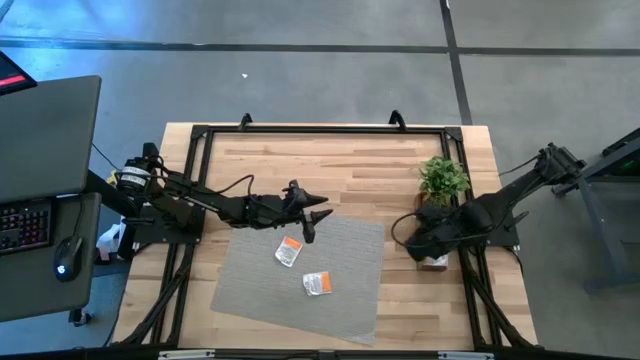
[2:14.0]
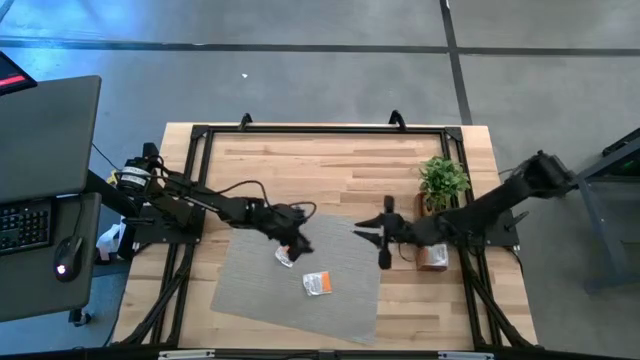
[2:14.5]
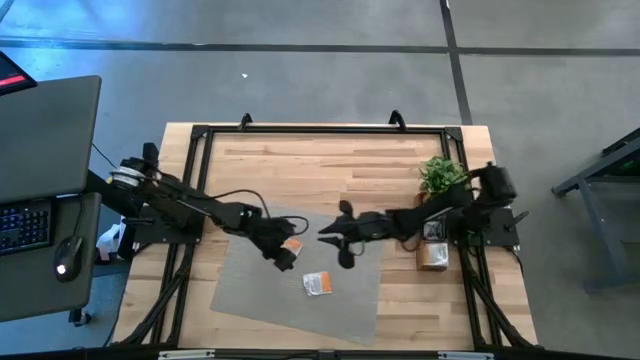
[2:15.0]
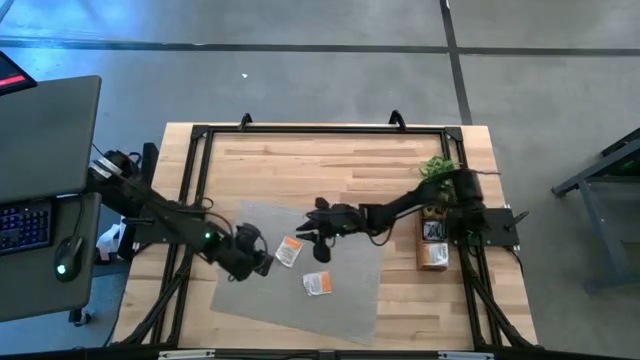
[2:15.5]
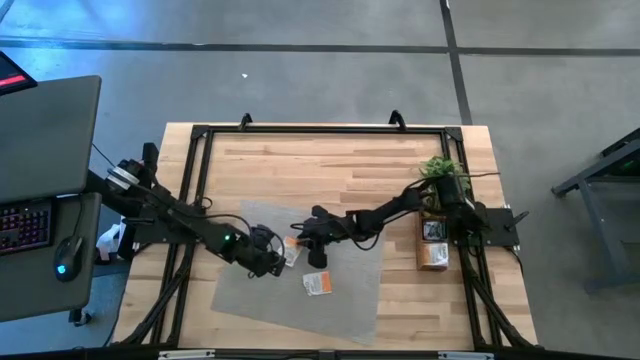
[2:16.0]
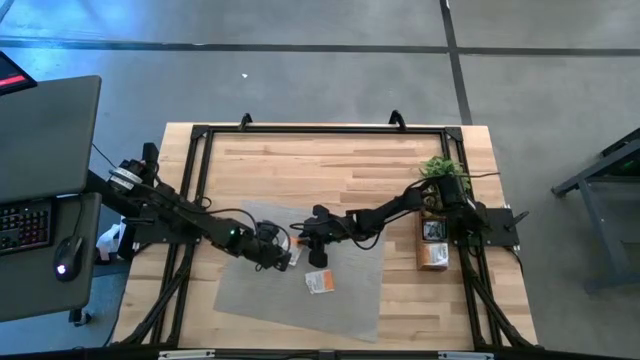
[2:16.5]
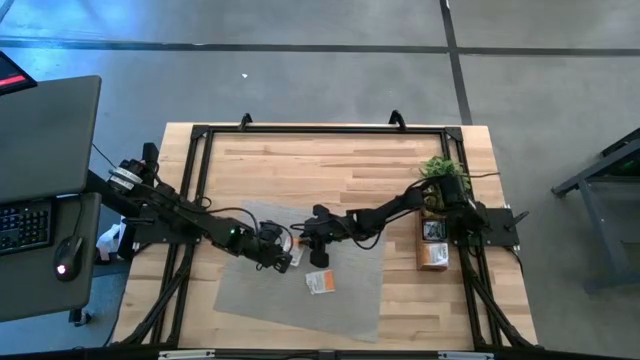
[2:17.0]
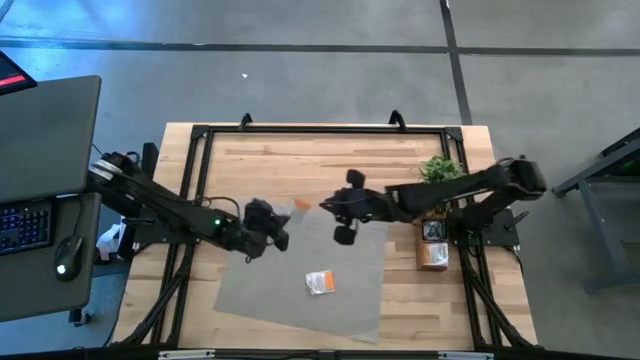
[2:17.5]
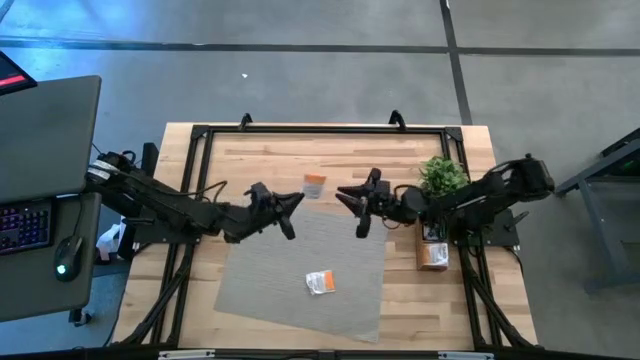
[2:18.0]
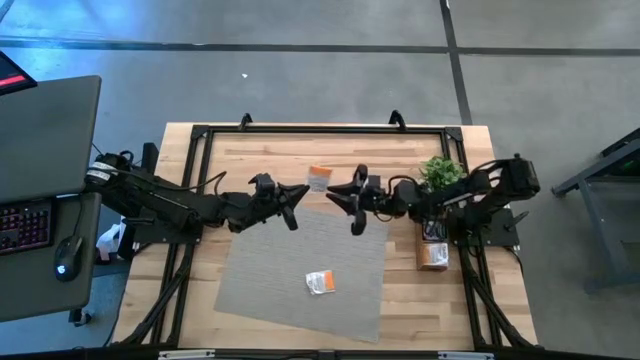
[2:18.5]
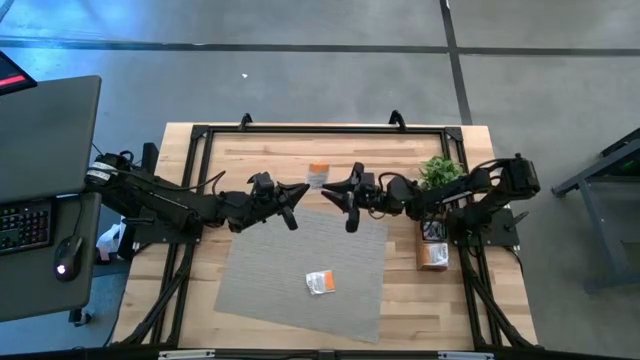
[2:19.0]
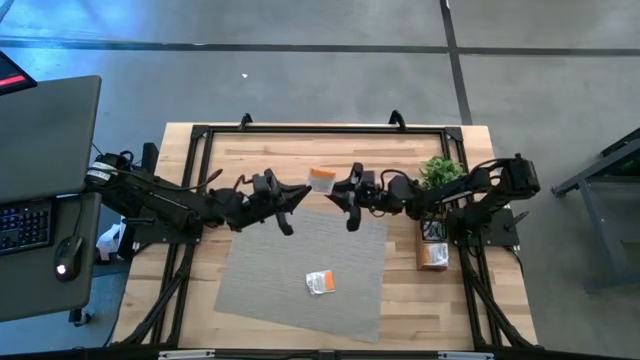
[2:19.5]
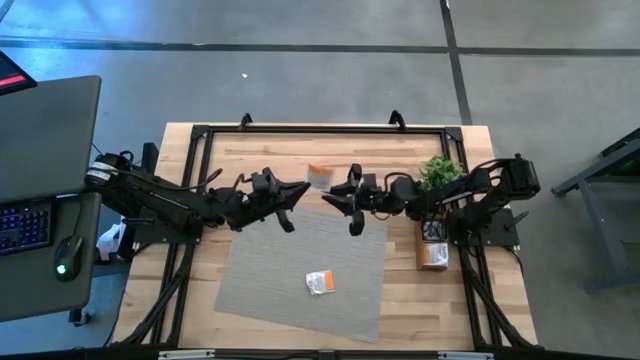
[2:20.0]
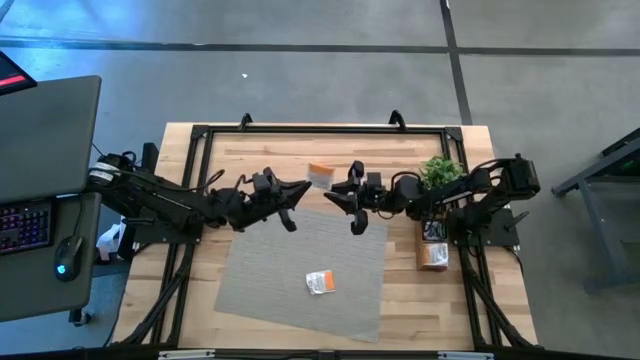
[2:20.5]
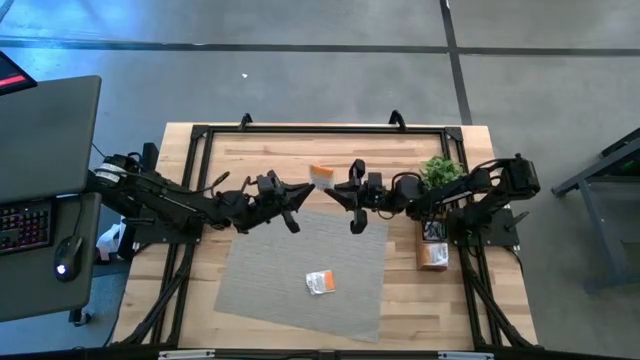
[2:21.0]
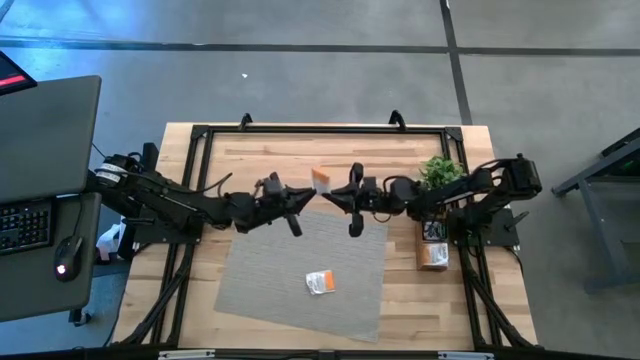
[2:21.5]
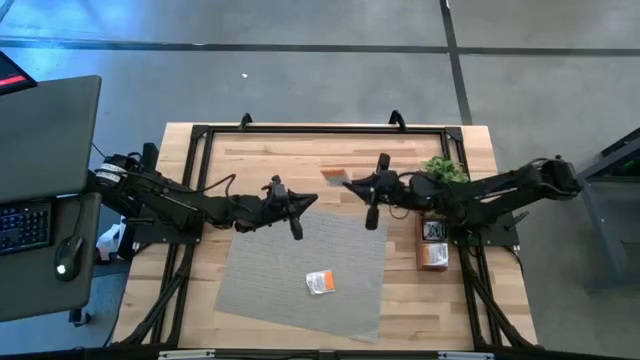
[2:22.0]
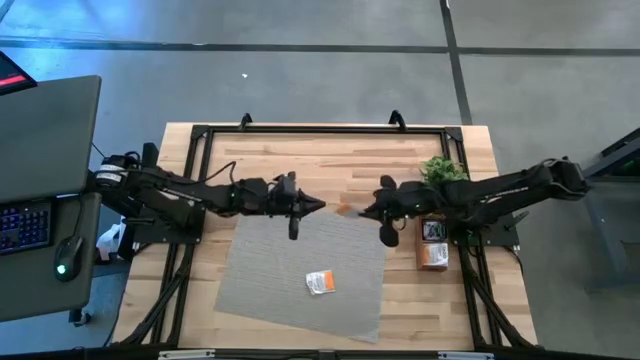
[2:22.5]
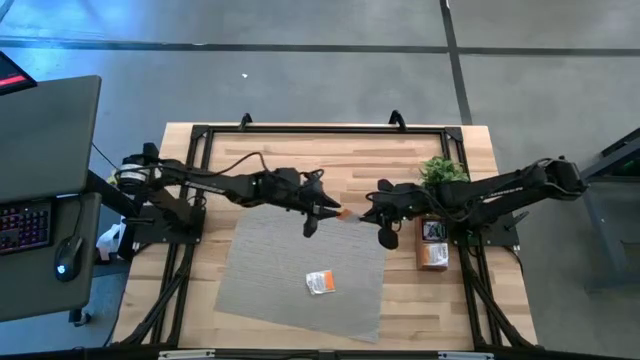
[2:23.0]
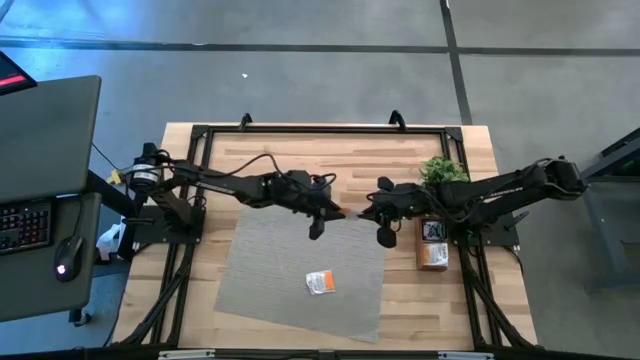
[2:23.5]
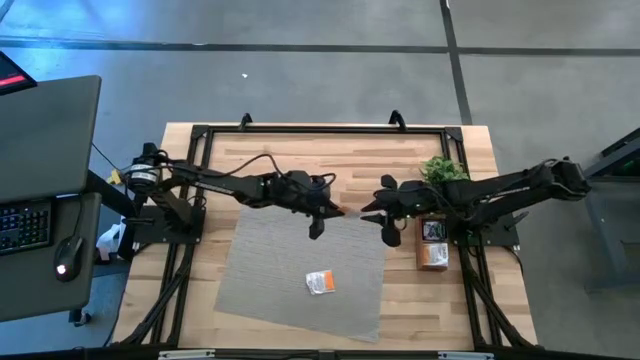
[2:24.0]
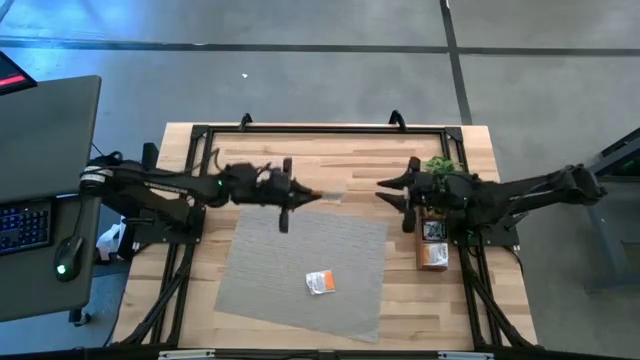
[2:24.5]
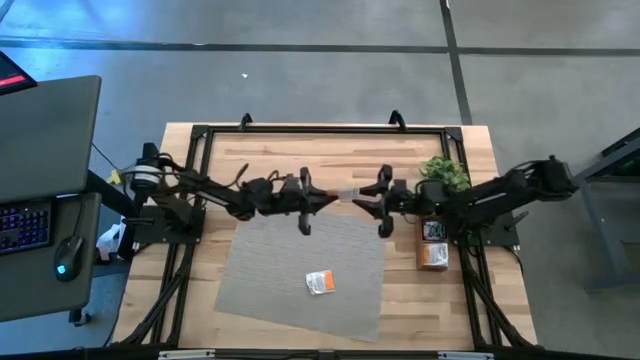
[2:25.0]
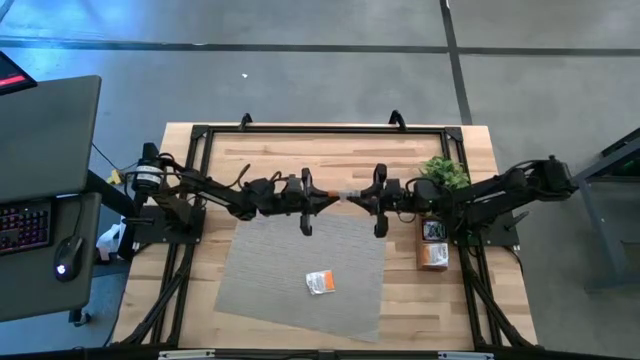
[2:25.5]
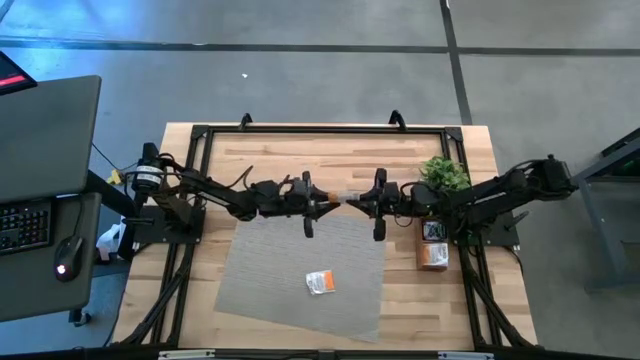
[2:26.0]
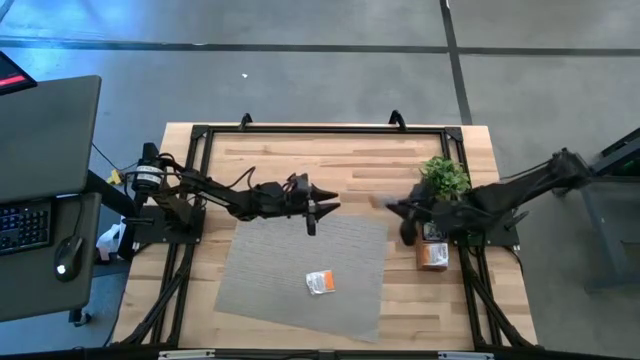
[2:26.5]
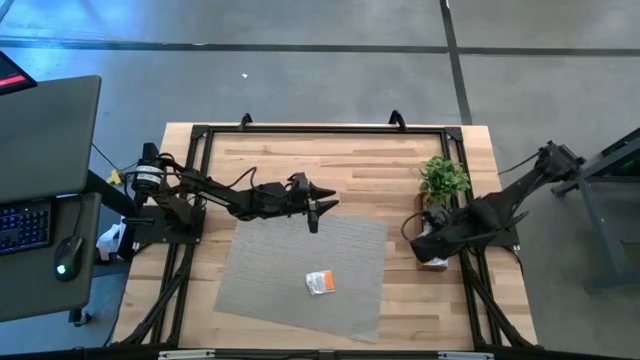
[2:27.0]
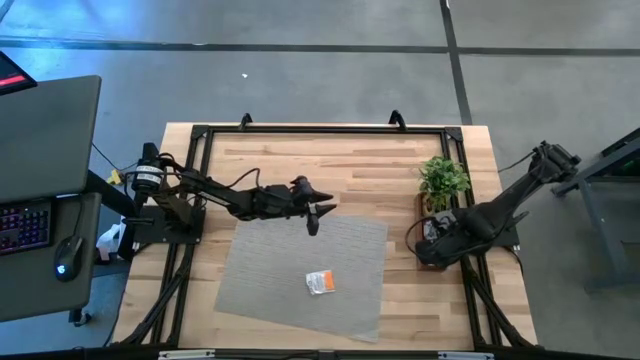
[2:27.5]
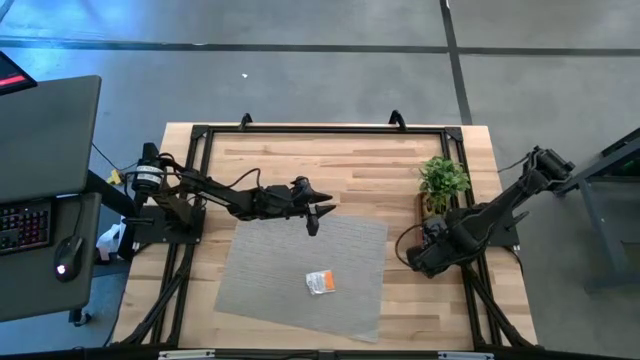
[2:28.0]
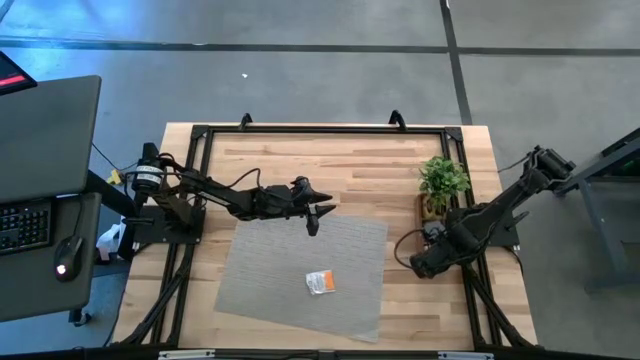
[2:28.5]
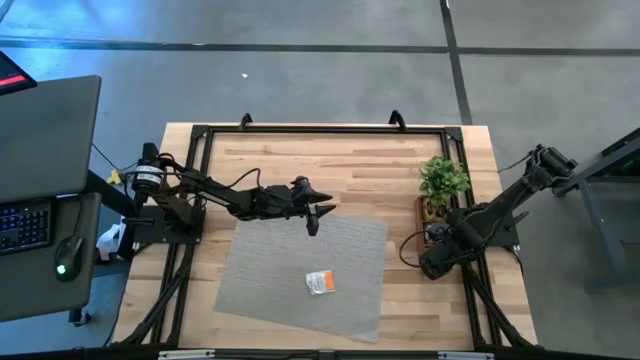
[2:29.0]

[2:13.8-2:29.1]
Task: Pick & Place Tea
Put the white tea bag into the bottom section of the wooden organizer

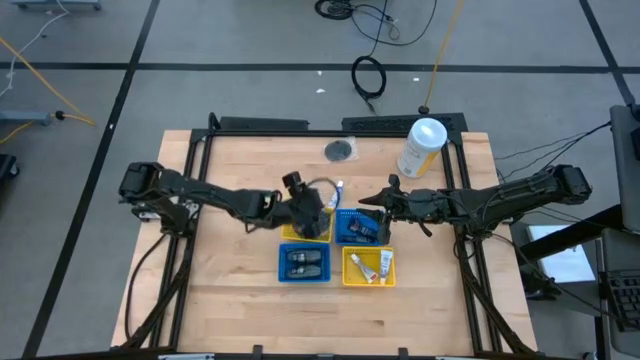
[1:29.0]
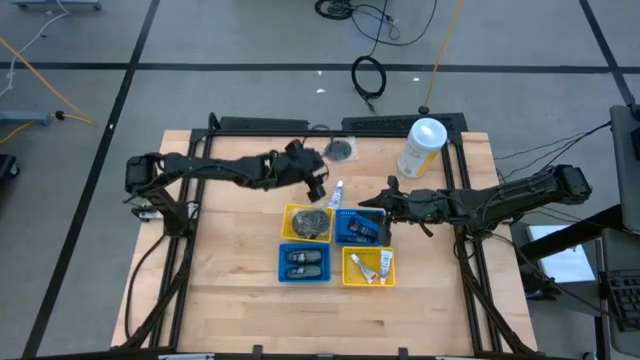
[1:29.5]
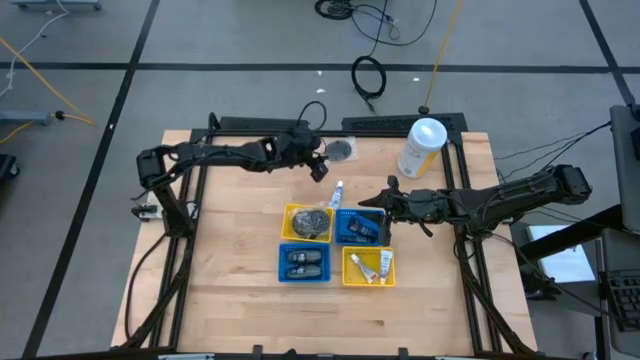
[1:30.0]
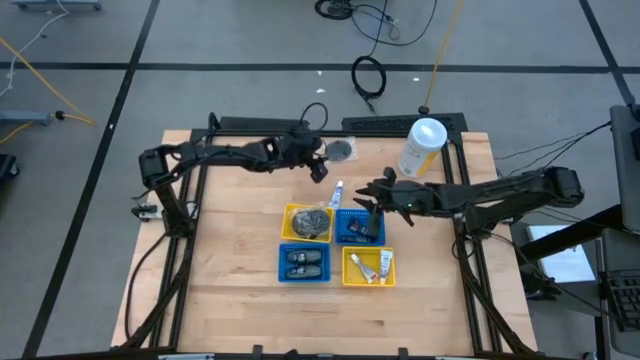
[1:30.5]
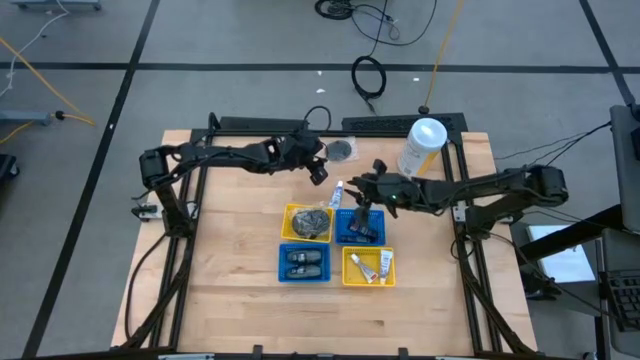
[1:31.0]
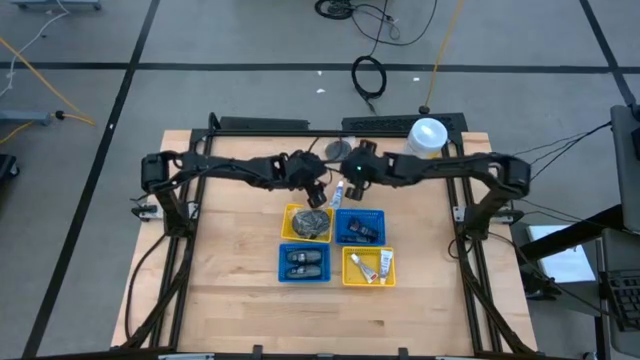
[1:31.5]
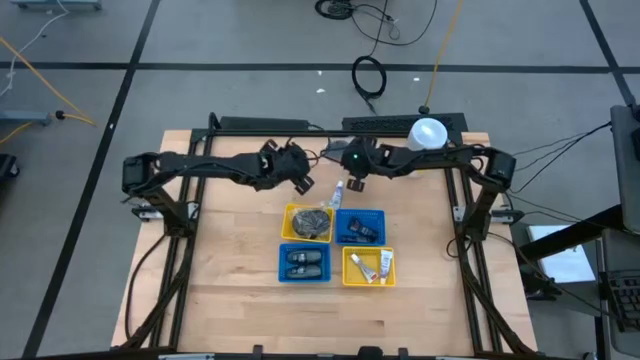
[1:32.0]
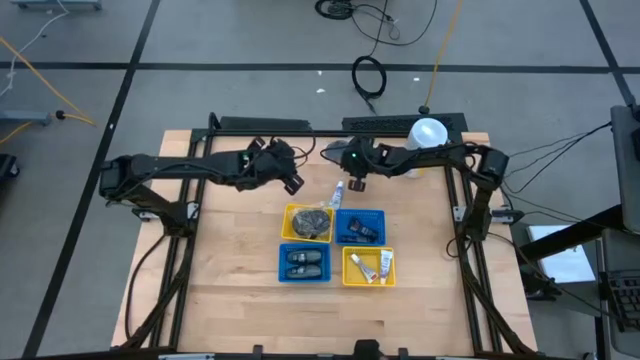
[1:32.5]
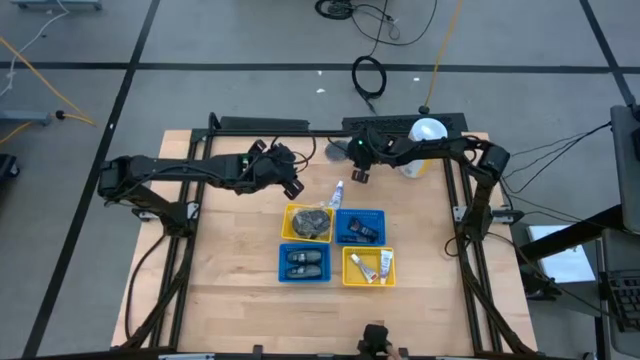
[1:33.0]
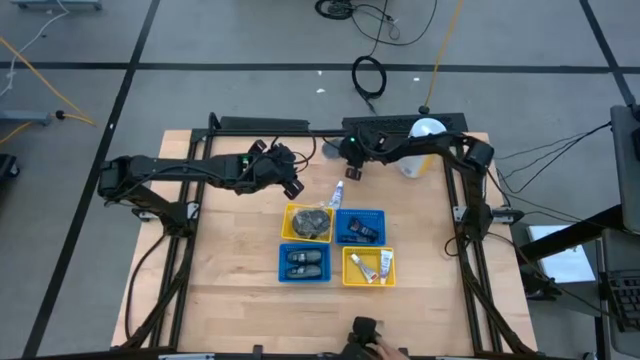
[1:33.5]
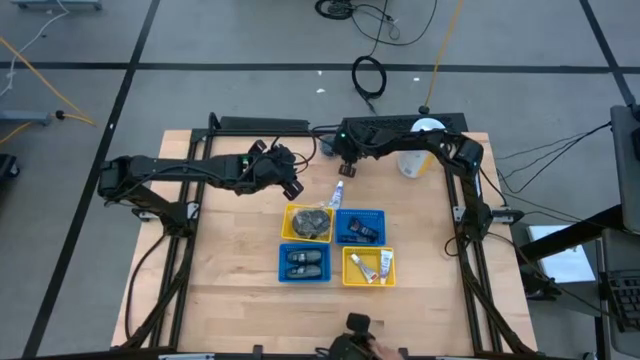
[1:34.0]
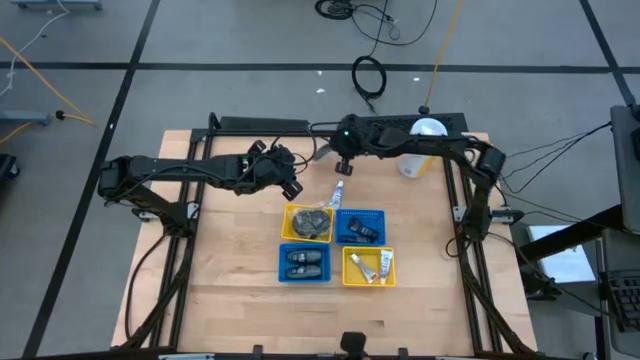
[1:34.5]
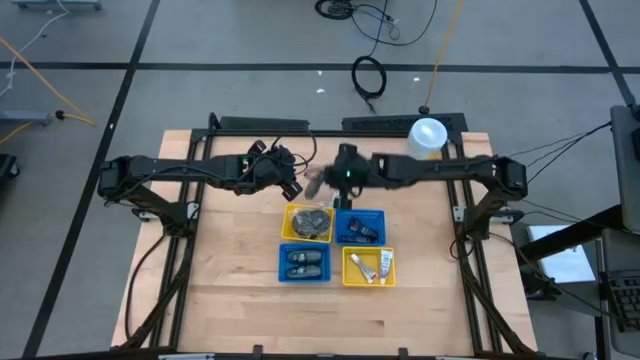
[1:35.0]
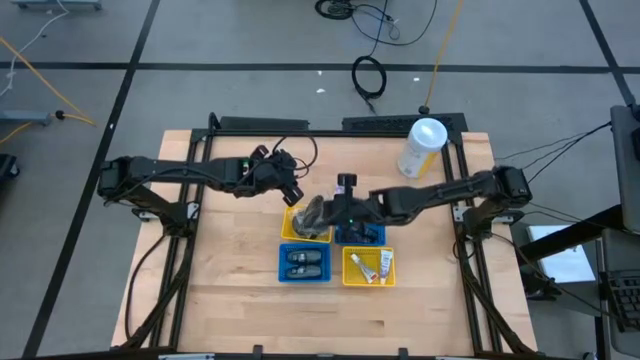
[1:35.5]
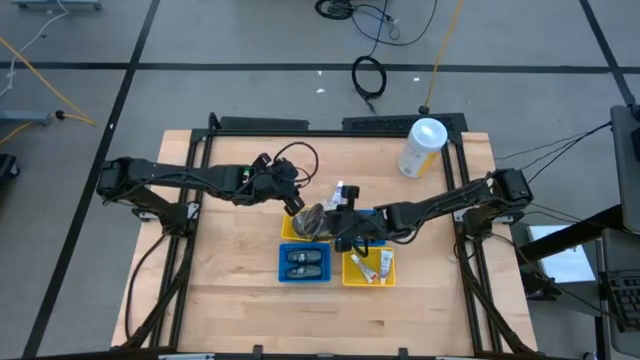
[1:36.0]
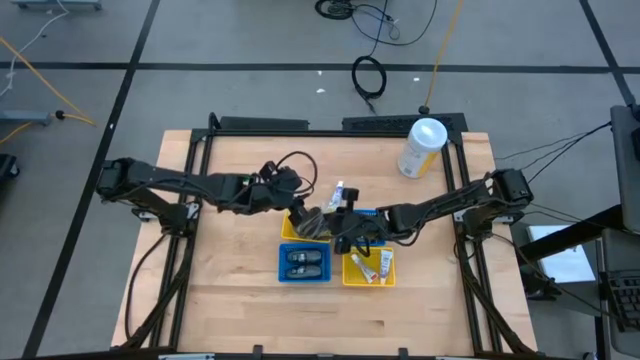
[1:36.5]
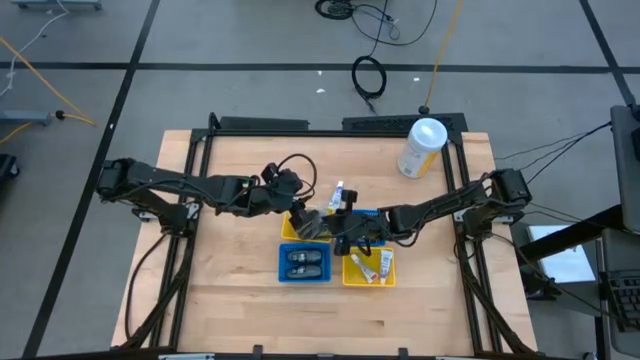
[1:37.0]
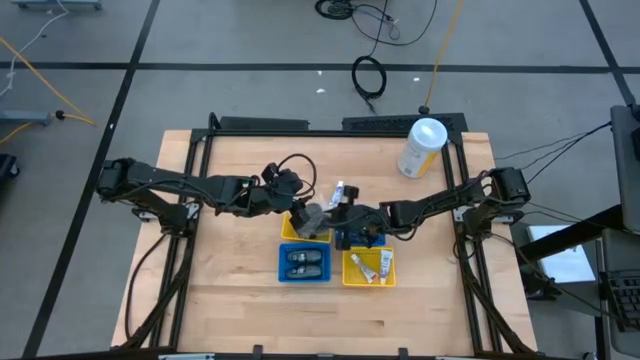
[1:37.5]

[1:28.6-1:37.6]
Task: Pick & Place Travel size toiletries
Put the black hairbrush into the top yellow basket
